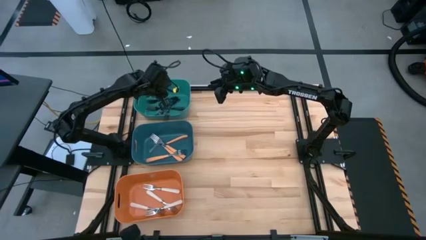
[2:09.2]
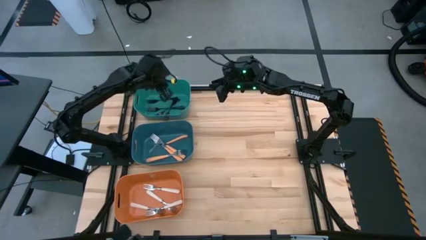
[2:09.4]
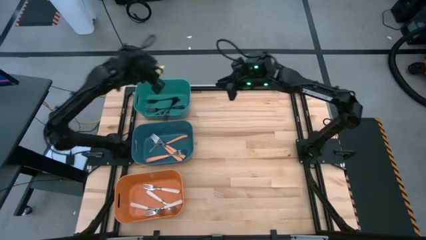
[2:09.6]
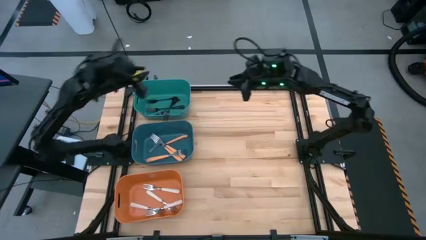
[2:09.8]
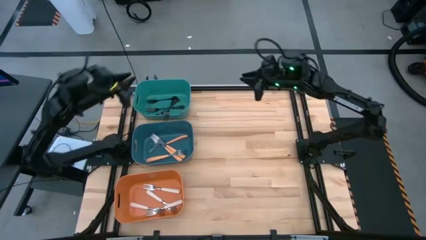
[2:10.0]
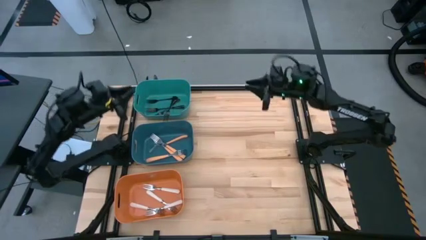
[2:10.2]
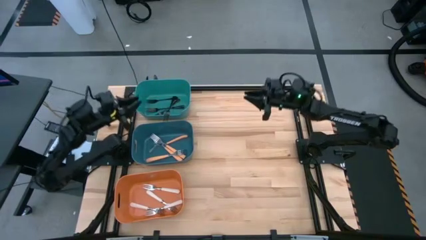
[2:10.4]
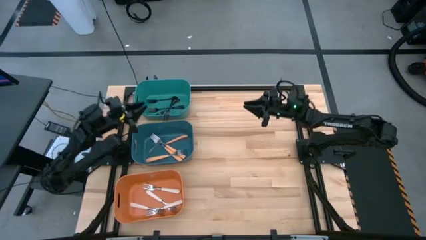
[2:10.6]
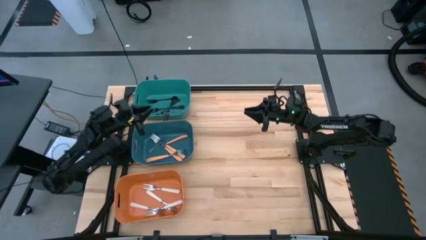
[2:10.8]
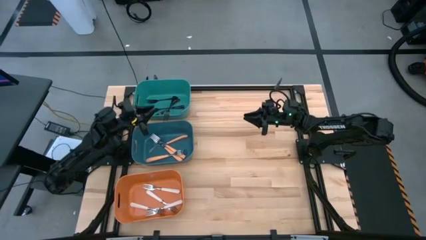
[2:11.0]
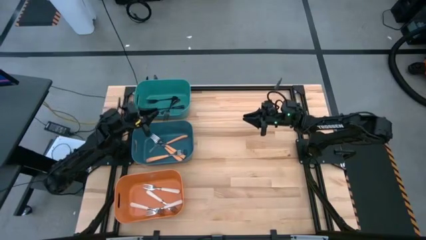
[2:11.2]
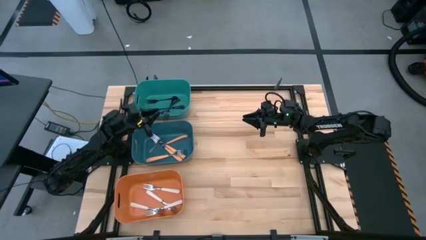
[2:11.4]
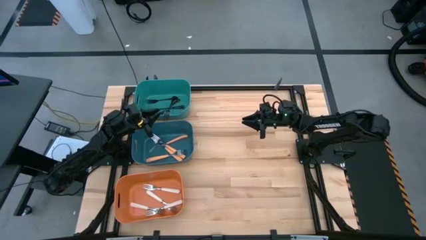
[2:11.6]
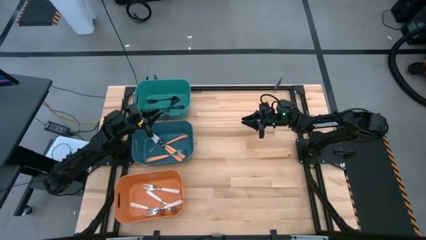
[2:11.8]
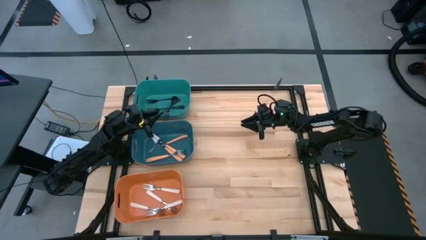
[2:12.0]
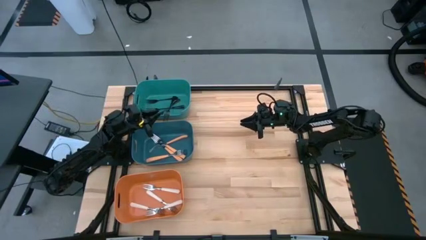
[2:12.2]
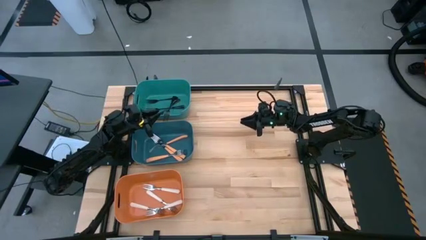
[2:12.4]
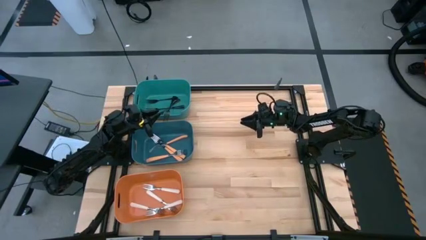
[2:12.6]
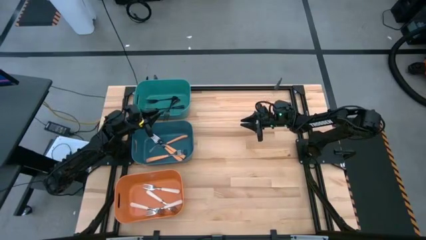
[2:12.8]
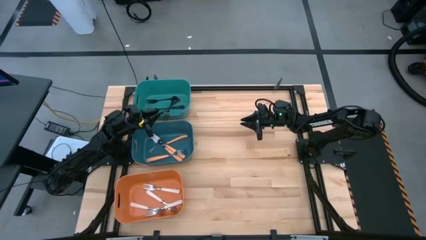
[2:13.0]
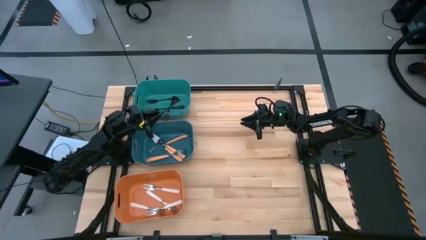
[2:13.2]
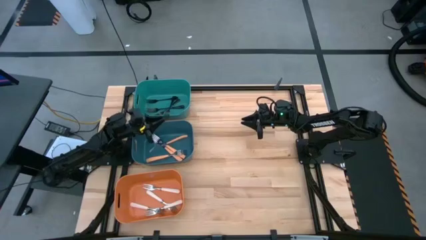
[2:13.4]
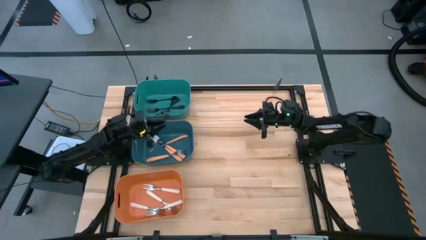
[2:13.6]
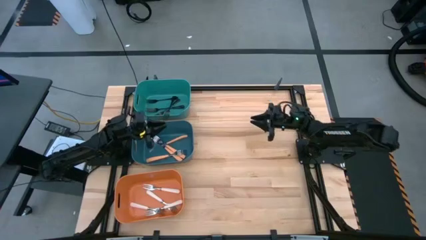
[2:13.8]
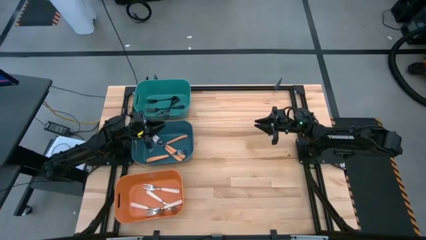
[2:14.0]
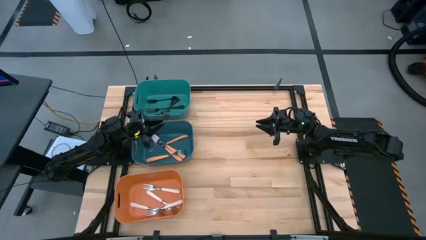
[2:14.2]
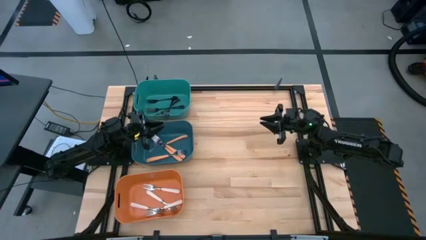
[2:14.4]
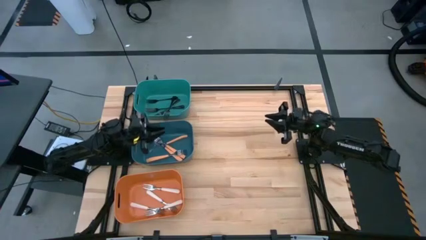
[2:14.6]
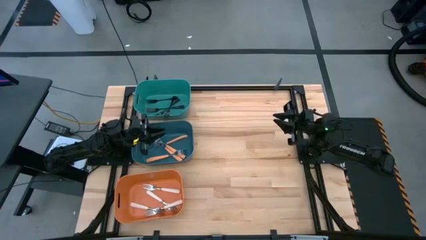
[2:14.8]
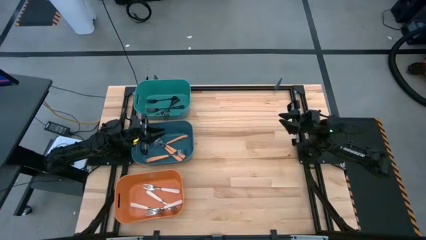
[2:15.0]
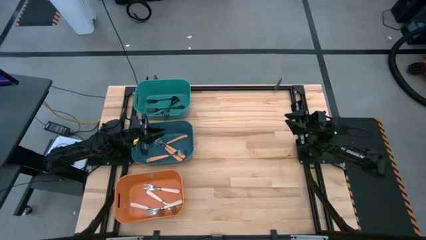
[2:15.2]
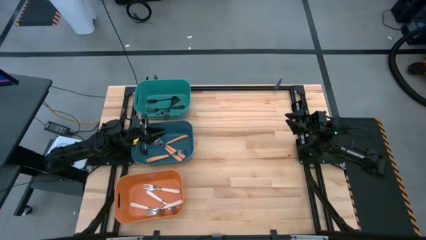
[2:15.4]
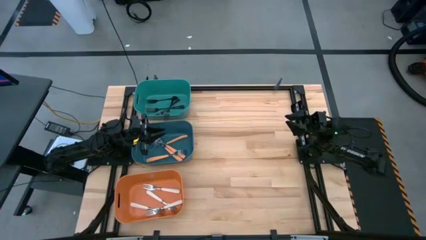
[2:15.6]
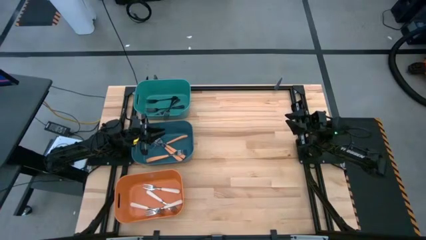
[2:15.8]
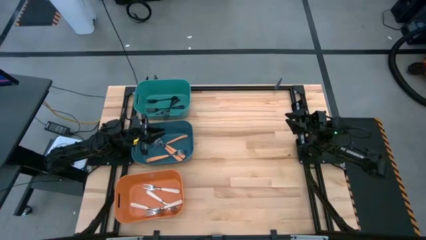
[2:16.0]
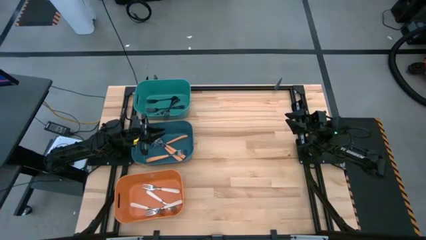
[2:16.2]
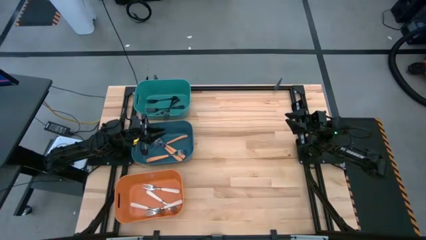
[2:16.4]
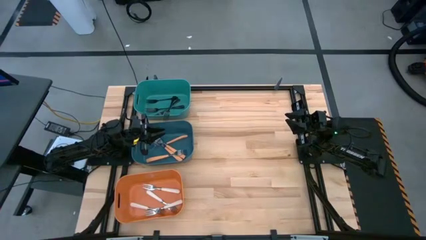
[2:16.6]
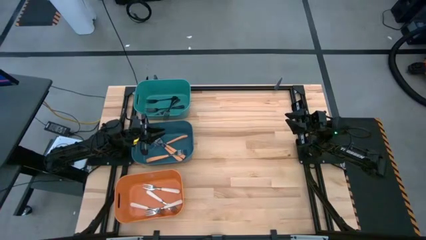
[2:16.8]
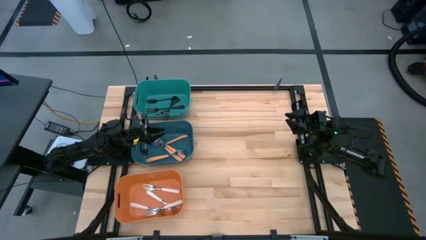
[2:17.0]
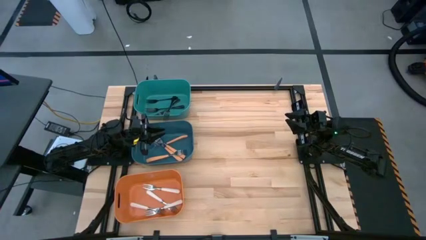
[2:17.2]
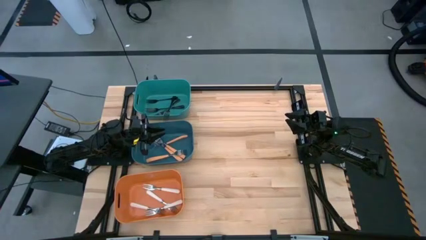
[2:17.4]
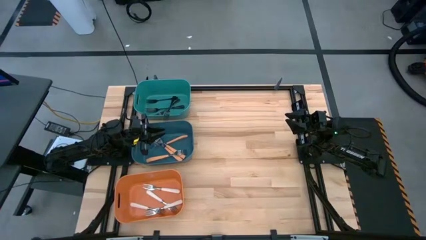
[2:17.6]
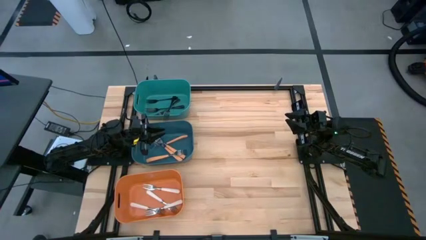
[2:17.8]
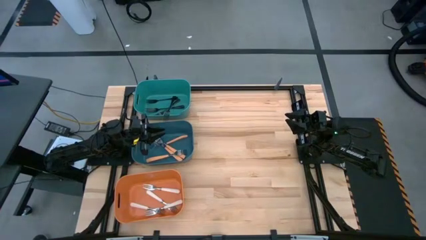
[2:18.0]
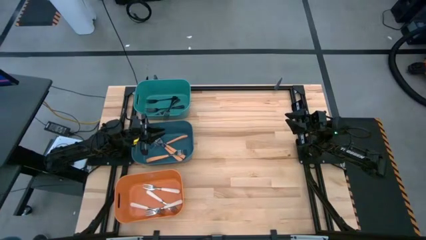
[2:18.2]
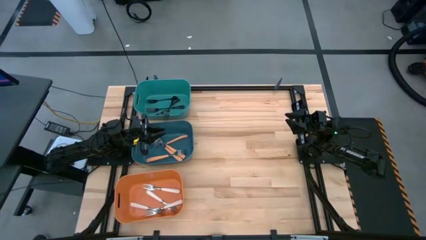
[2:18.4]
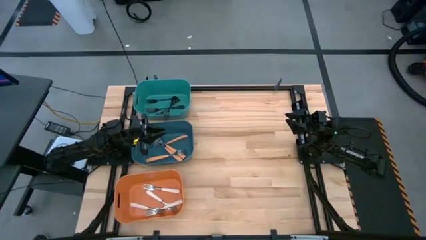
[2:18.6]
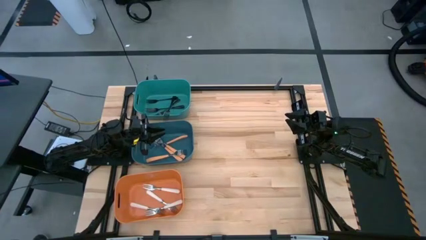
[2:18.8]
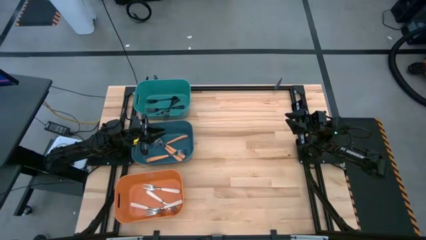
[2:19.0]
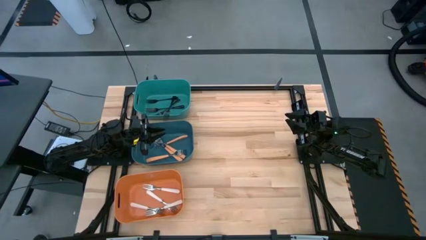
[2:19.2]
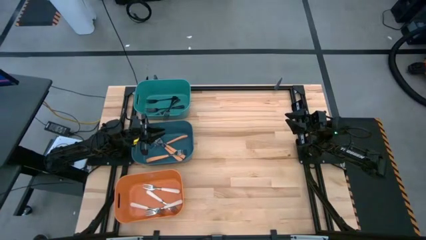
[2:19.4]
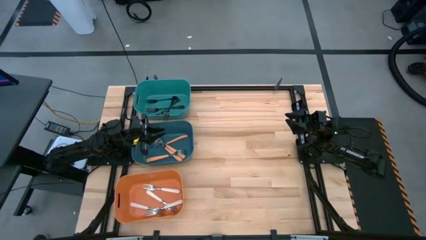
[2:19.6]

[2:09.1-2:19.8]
Task: Sort silverware by color (type)
Return to Home Position

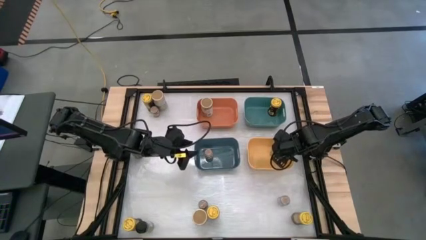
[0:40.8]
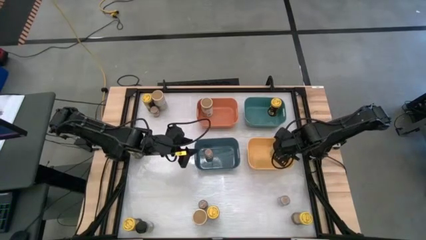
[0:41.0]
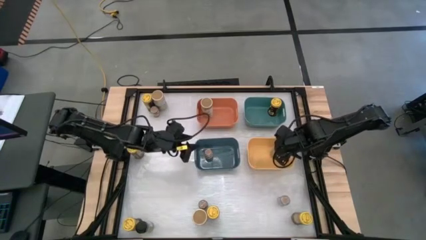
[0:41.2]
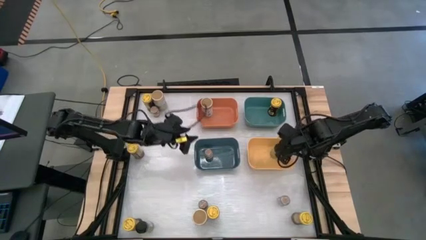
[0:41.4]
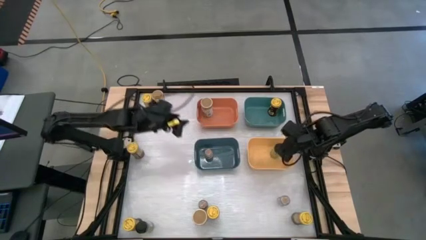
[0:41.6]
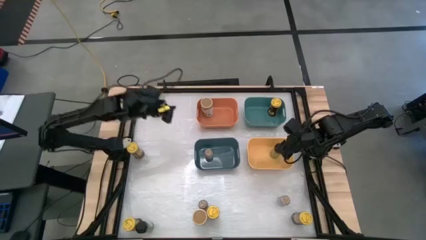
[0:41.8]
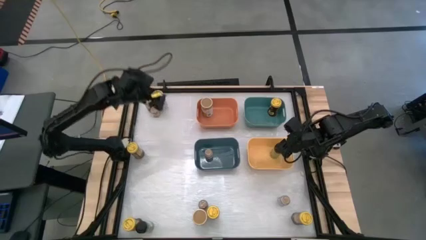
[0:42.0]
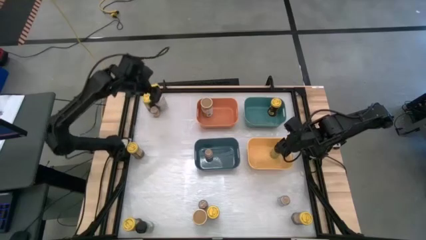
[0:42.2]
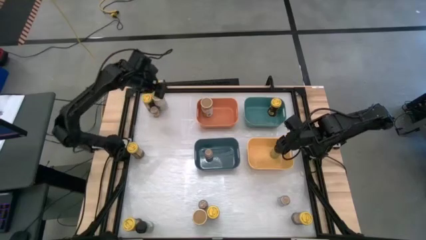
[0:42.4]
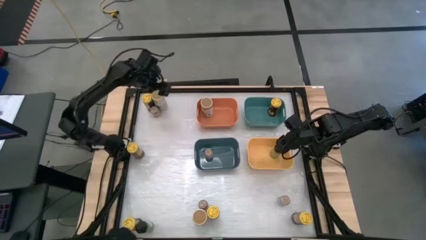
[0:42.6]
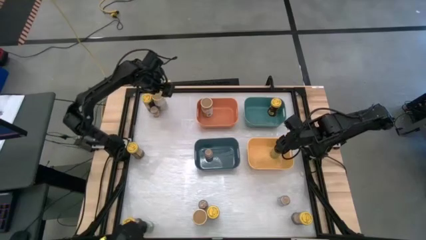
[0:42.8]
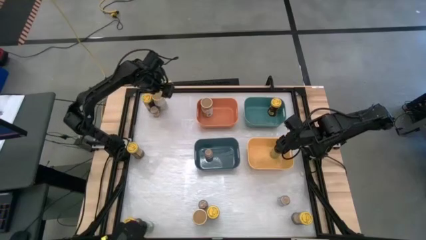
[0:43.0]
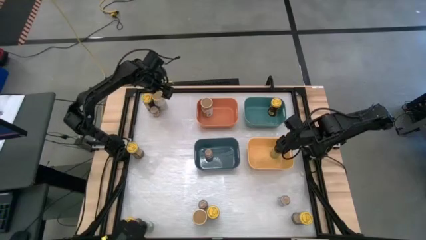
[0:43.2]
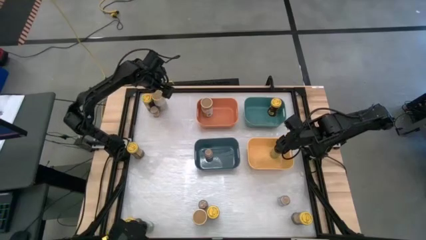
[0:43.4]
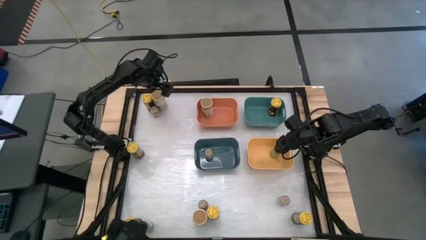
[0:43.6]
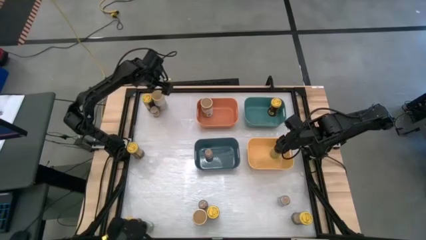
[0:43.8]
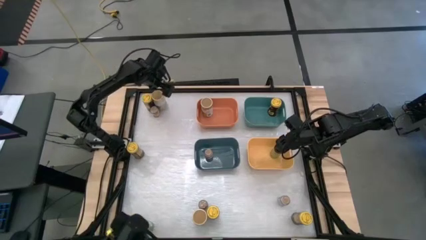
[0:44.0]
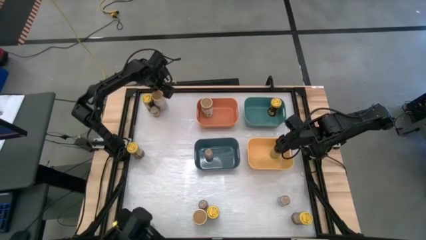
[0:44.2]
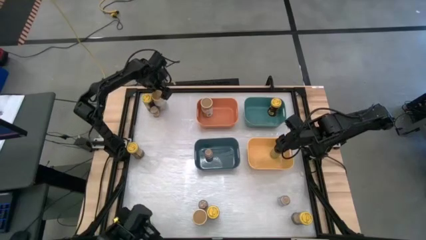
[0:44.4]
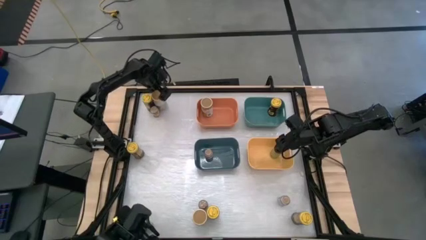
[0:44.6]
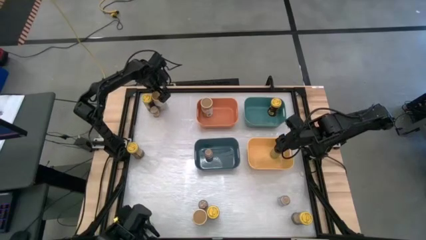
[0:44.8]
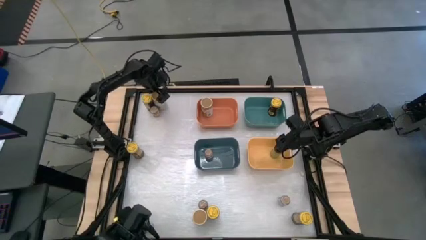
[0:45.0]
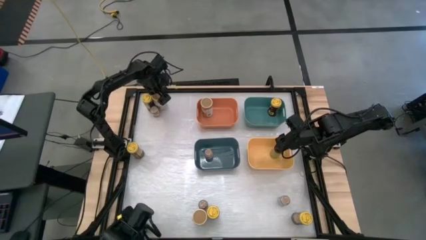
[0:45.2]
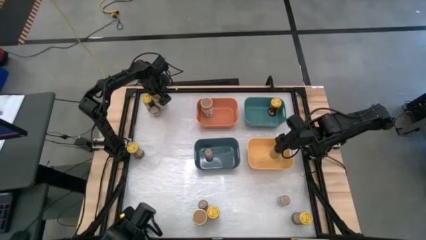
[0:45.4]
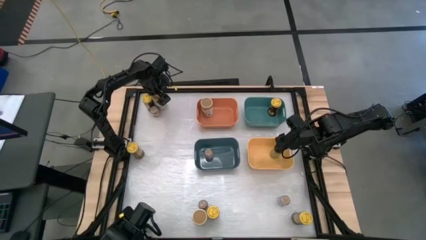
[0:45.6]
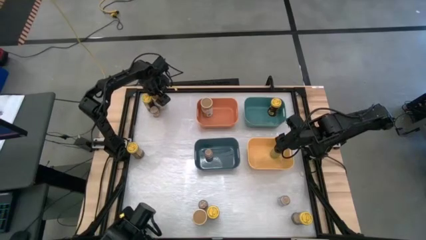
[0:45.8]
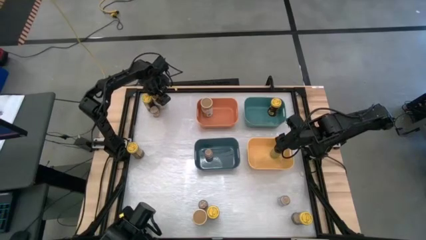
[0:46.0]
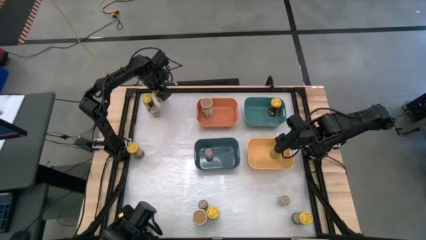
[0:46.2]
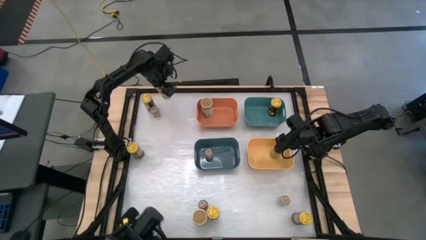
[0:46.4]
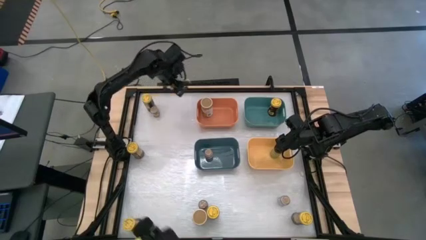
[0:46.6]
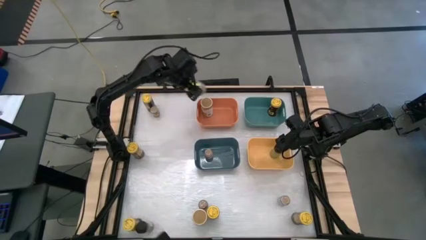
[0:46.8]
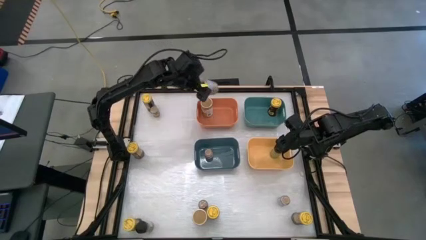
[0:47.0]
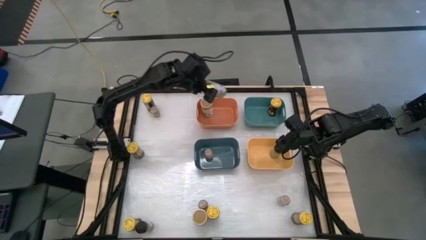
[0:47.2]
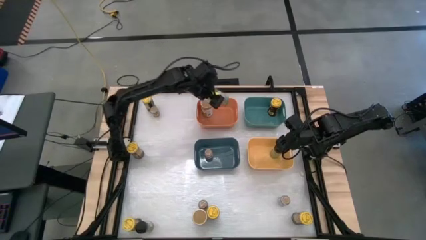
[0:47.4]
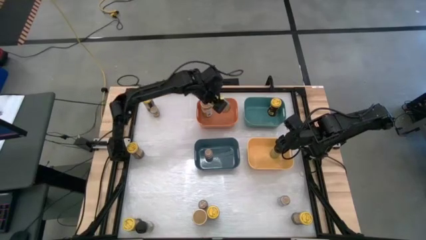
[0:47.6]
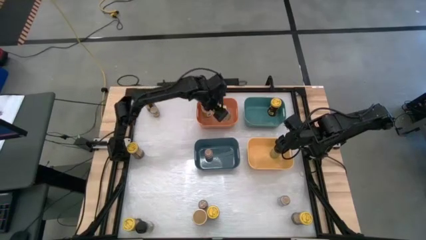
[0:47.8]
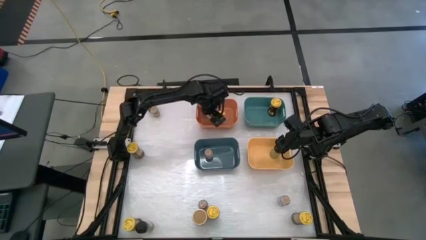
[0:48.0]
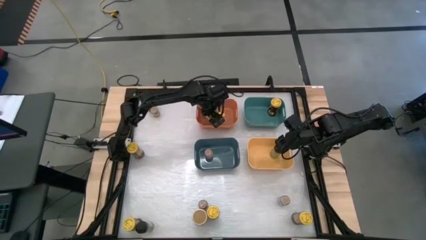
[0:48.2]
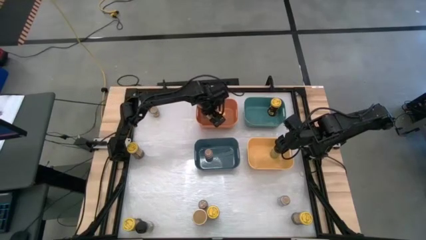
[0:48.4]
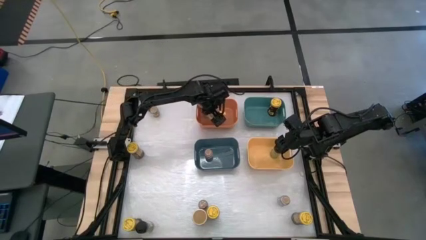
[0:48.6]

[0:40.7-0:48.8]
Task: Sort spices by type
Put the gold spice bottle into the orange bin
